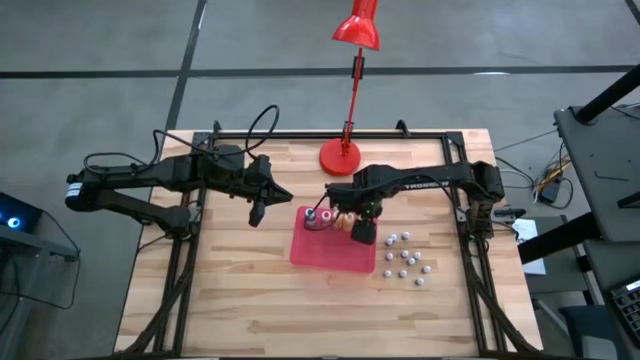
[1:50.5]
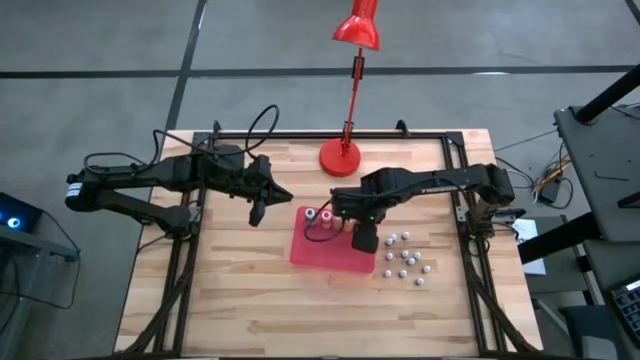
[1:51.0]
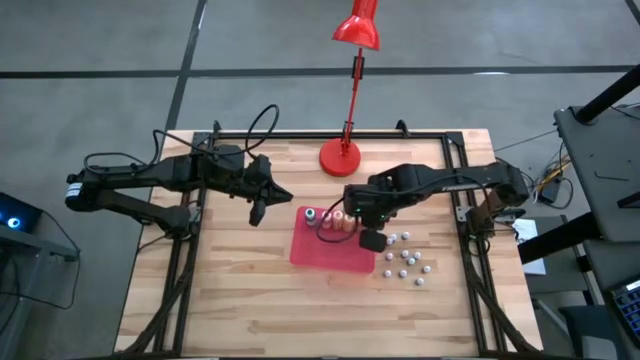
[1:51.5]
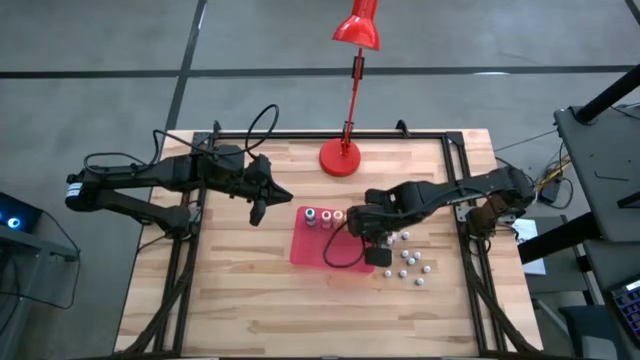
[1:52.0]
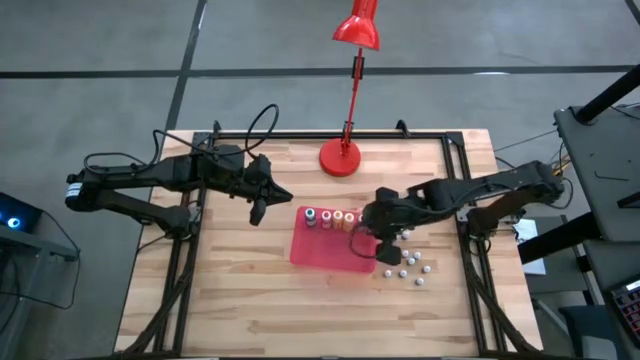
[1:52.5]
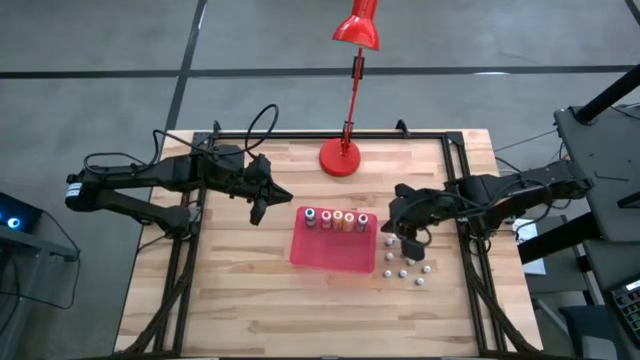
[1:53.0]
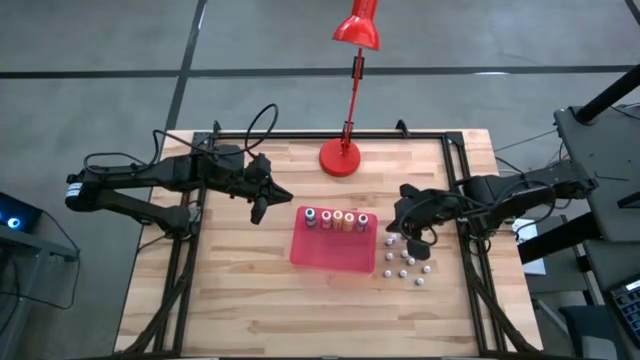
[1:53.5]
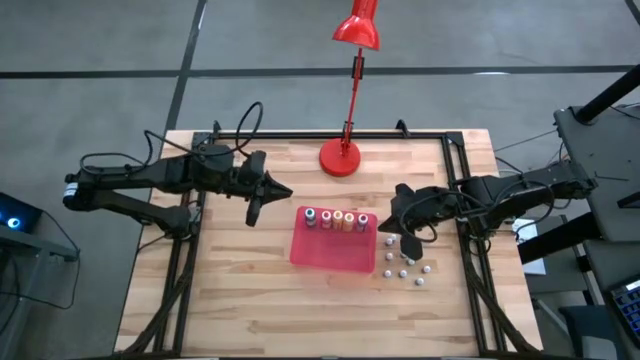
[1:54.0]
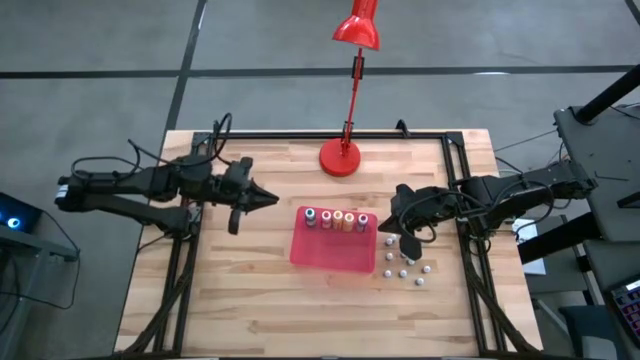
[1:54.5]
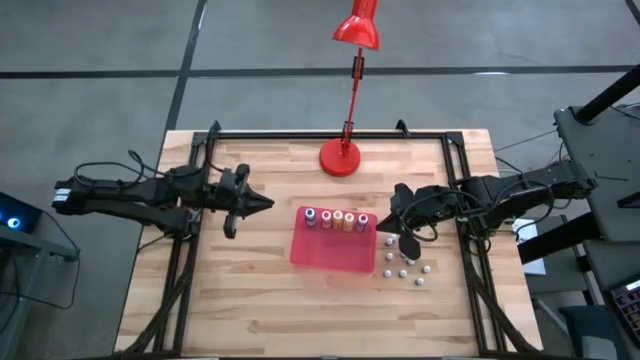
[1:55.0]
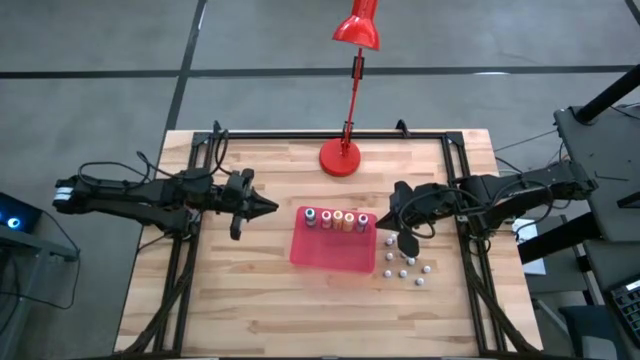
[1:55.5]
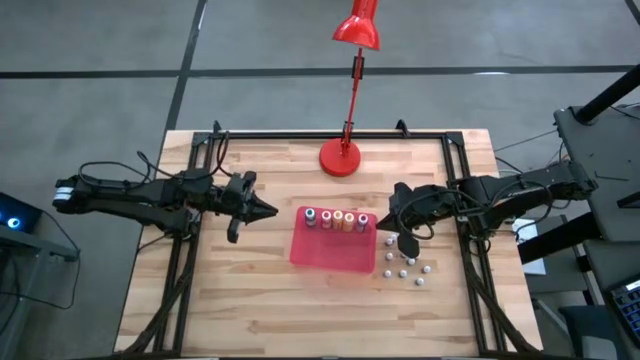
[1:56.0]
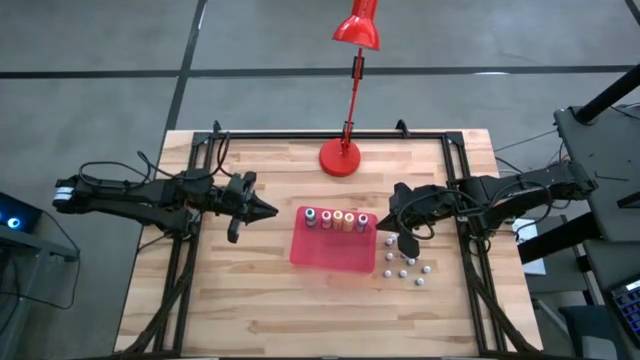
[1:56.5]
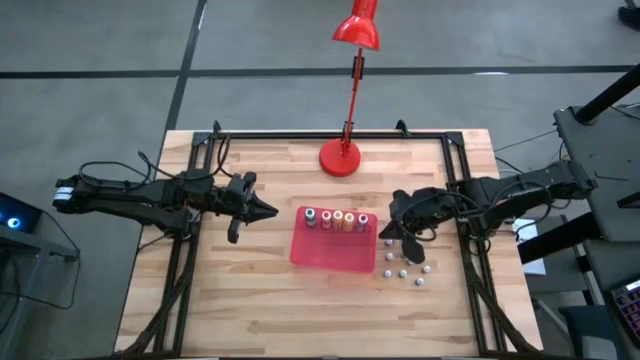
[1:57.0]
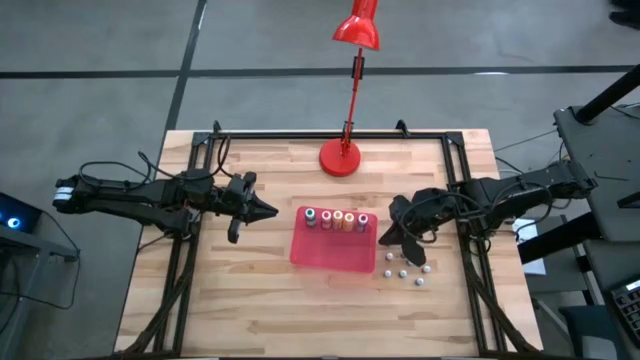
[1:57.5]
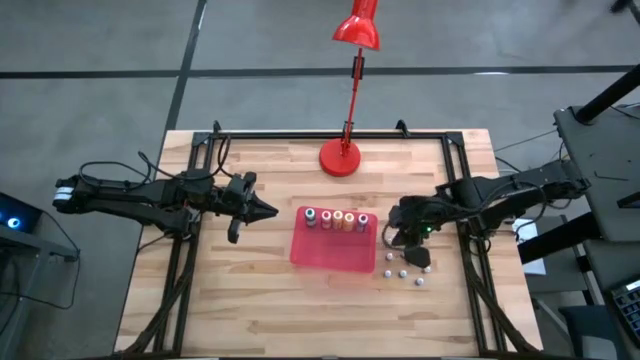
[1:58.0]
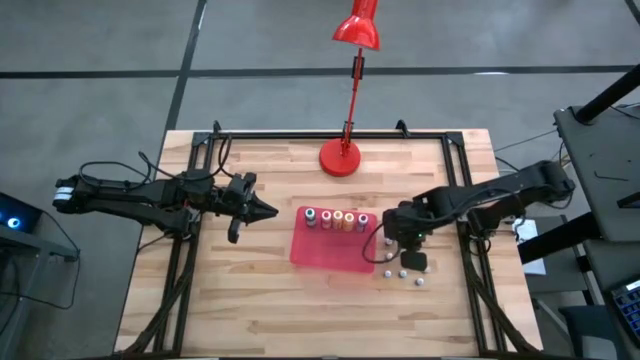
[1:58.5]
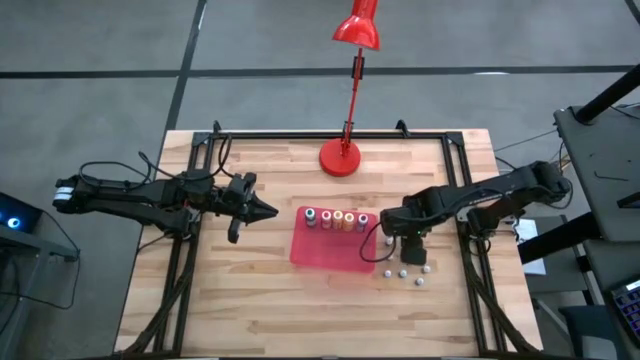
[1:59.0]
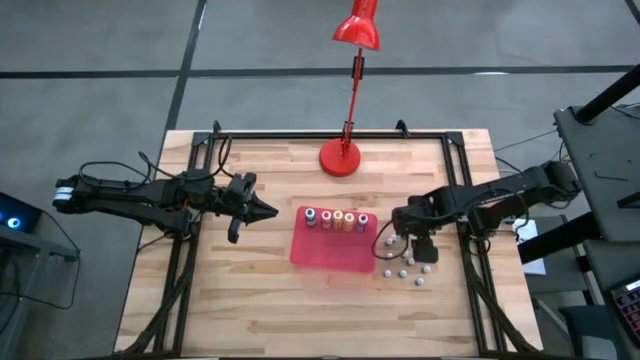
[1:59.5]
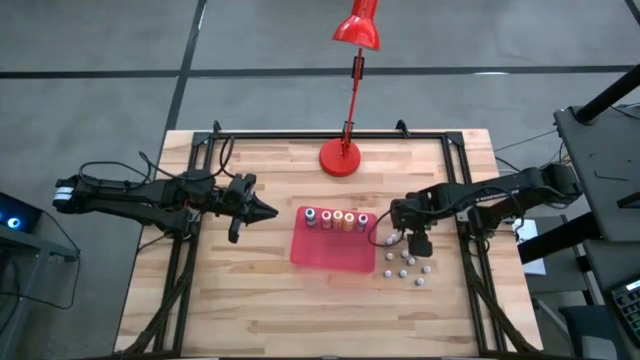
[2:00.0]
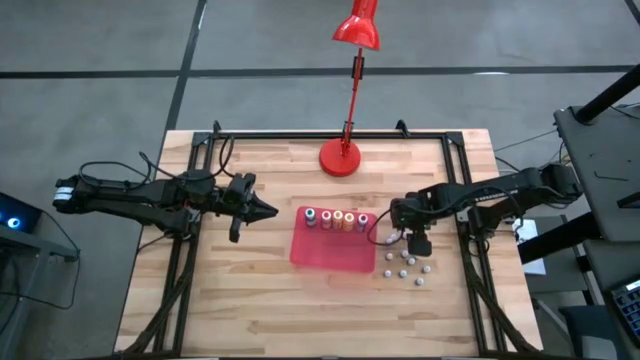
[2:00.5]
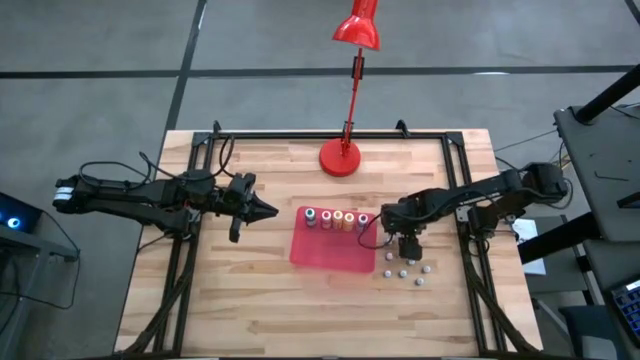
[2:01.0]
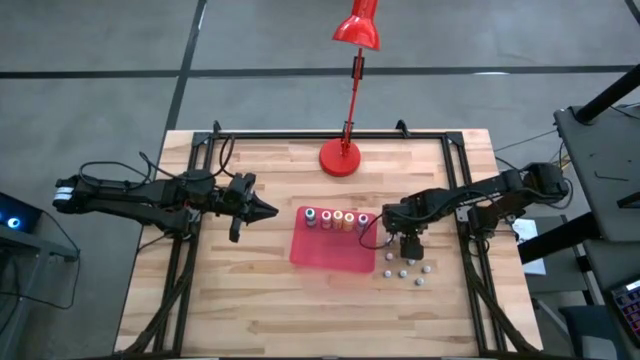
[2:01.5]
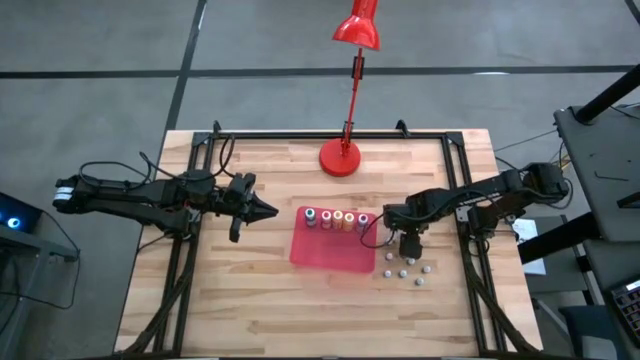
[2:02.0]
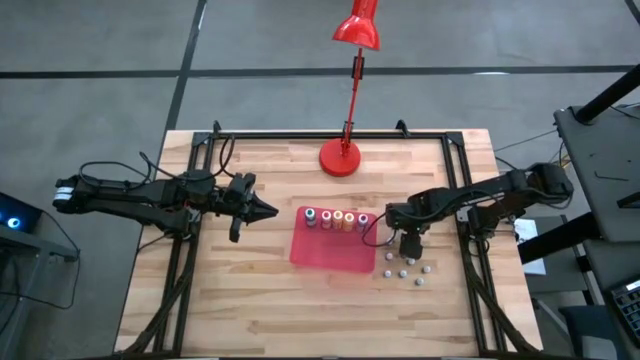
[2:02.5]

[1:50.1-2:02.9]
Task: Pick & Place food coloring
Put the small black food coloring bottle into the red bin

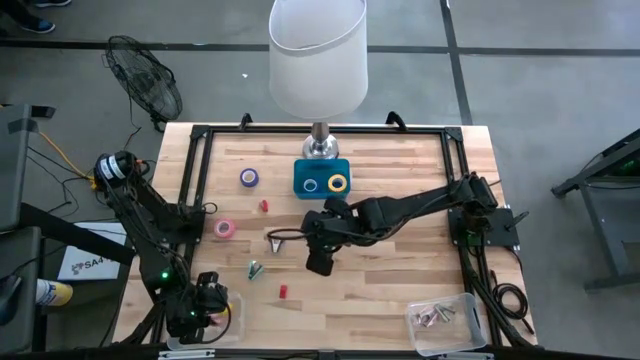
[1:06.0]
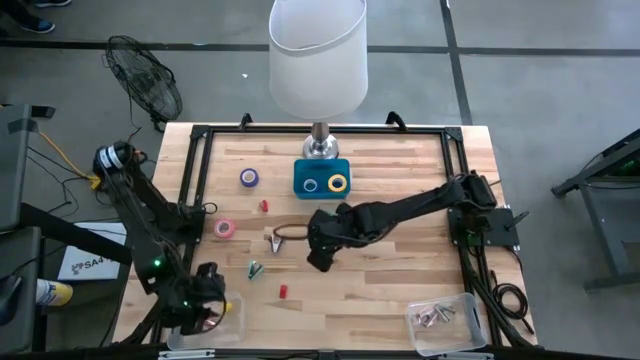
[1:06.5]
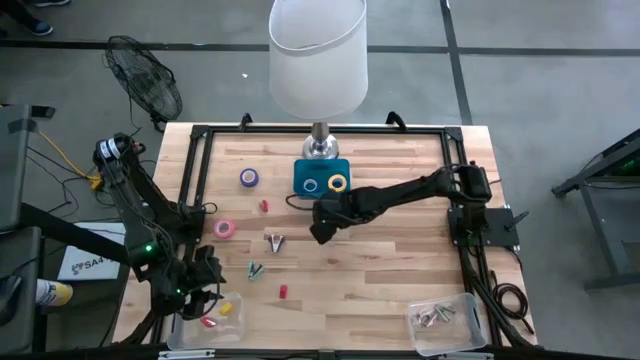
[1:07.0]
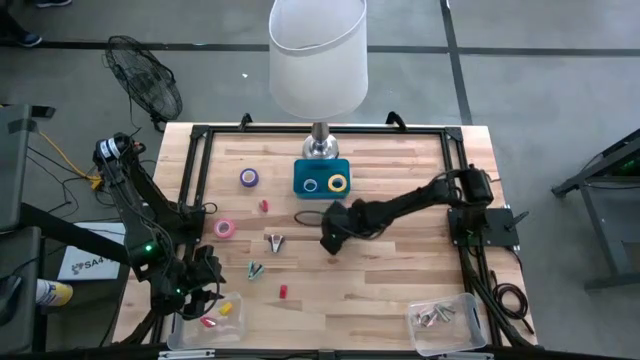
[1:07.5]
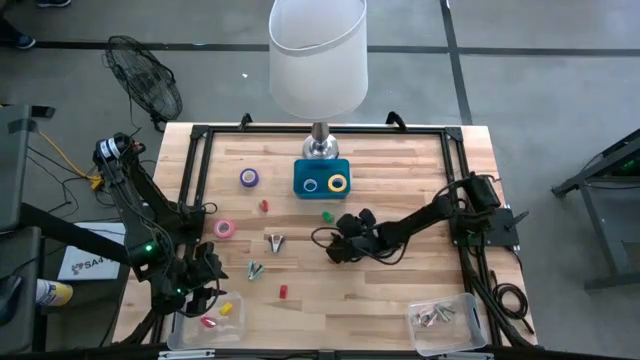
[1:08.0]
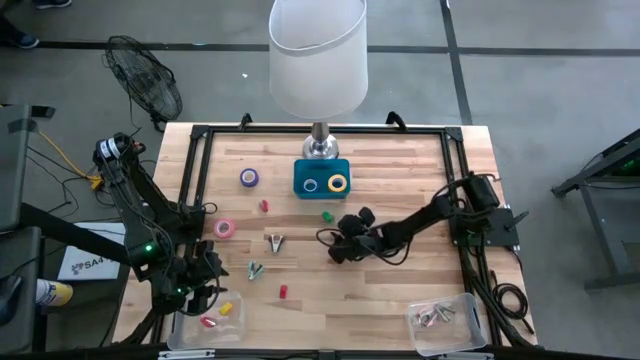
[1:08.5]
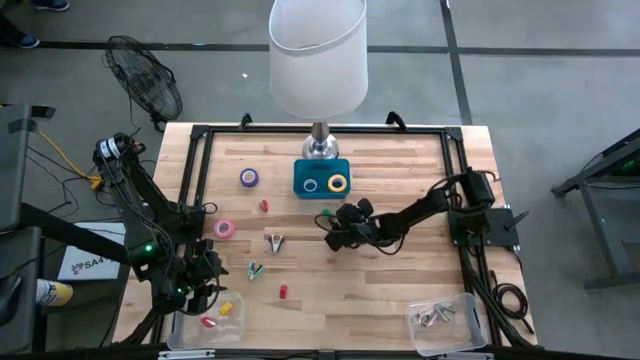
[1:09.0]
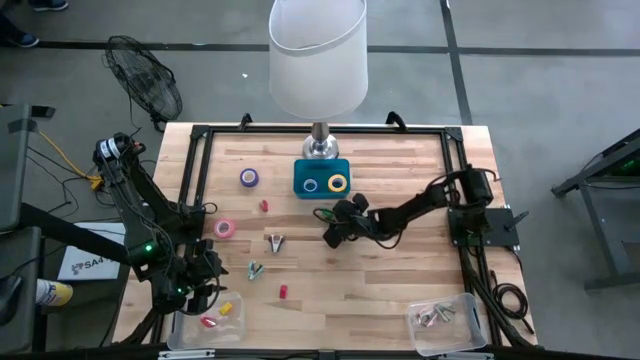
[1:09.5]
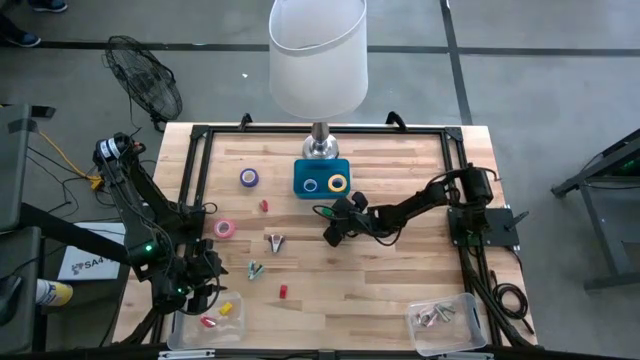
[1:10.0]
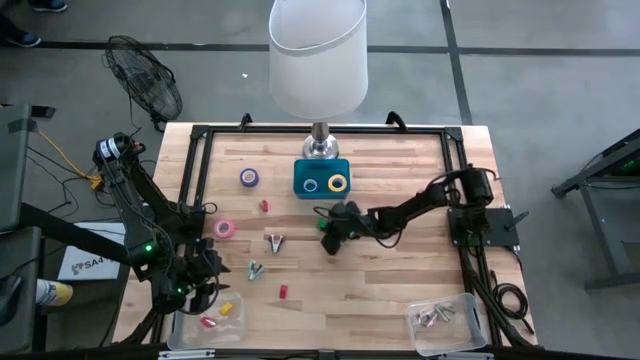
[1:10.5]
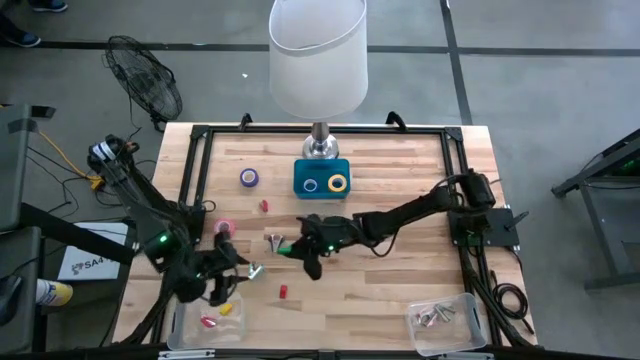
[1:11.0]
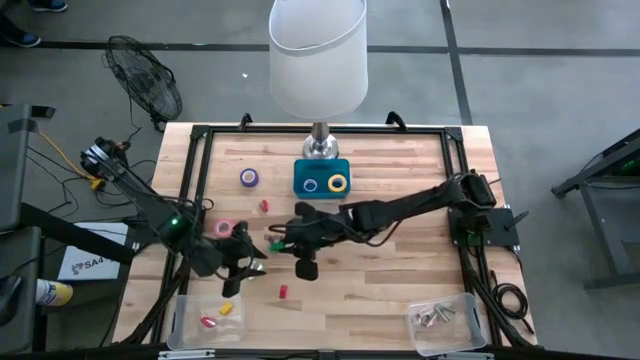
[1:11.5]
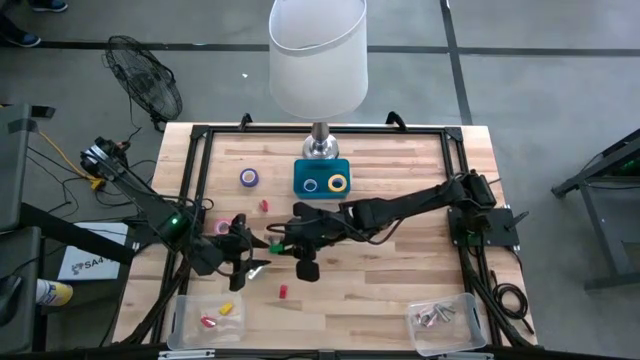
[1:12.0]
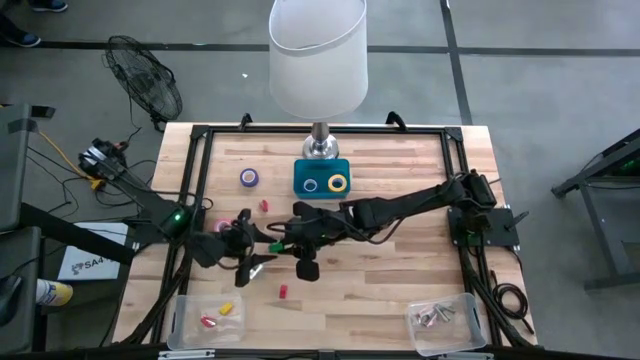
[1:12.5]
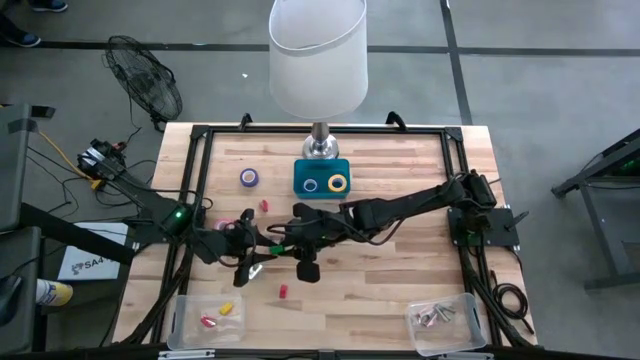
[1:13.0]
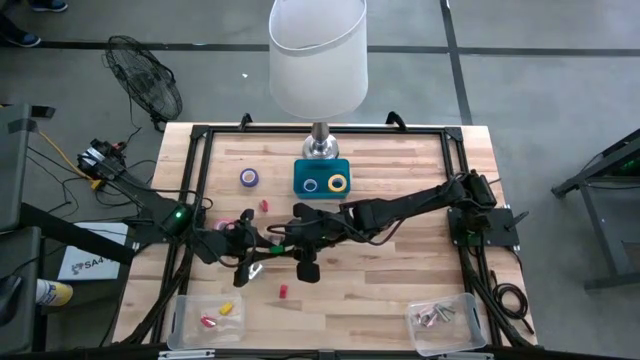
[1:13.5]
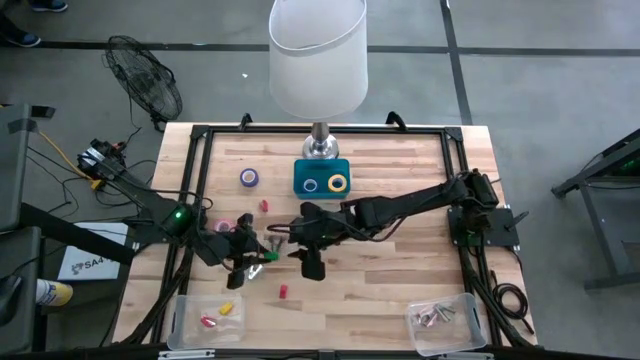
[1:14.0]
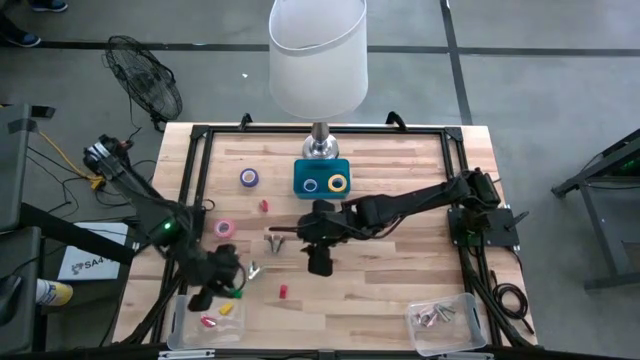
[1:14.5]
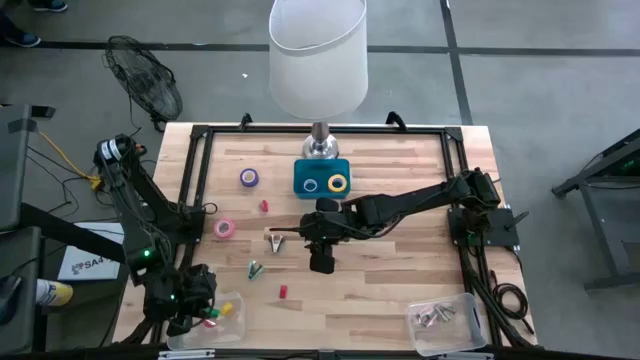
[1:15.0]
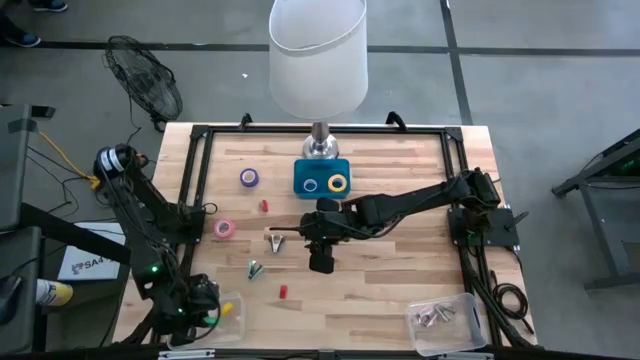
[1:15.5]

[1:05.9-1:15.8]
Task: Pick and place Stapler, Stapler remover, tape
Put the green stapler into the left transparent bin
